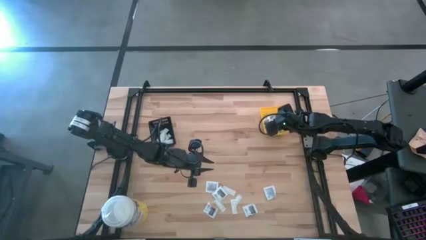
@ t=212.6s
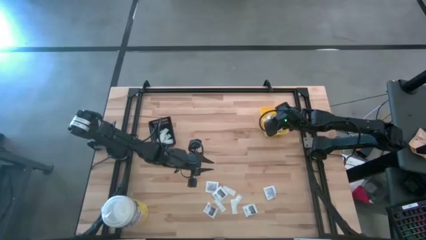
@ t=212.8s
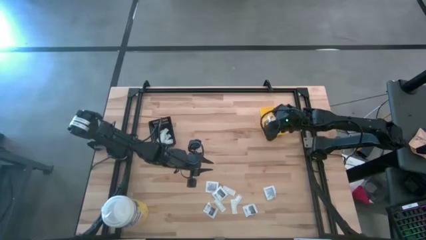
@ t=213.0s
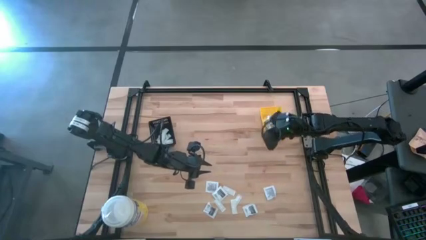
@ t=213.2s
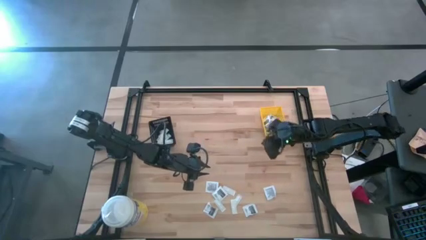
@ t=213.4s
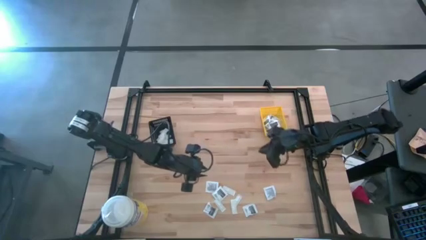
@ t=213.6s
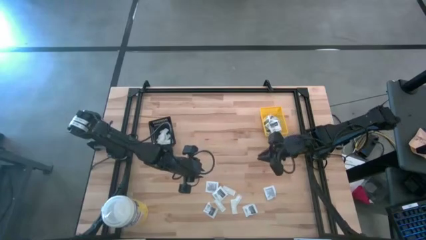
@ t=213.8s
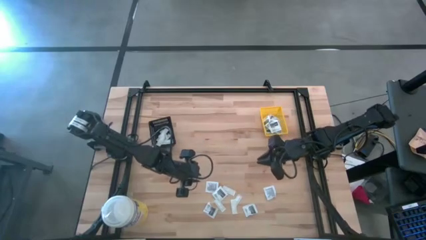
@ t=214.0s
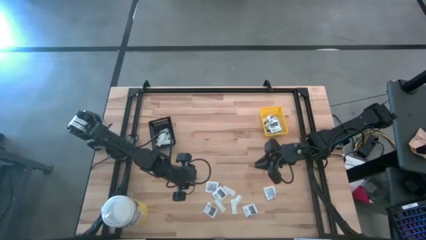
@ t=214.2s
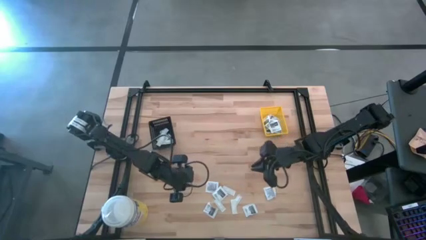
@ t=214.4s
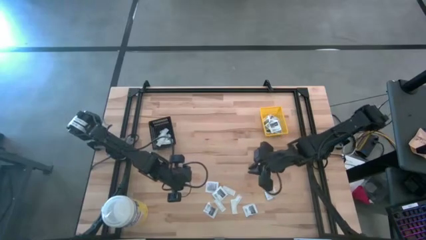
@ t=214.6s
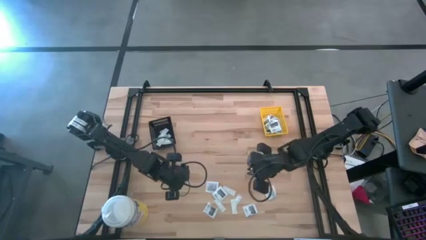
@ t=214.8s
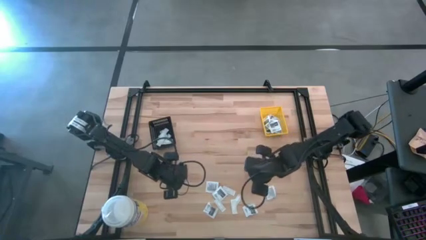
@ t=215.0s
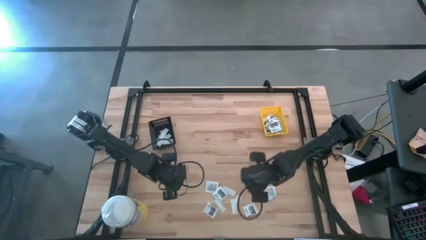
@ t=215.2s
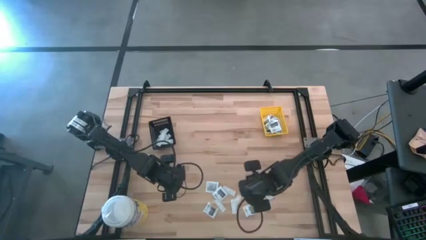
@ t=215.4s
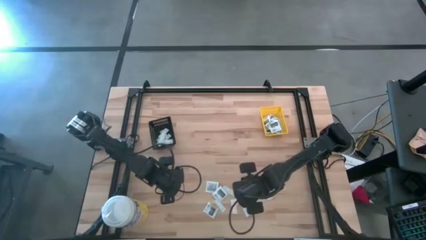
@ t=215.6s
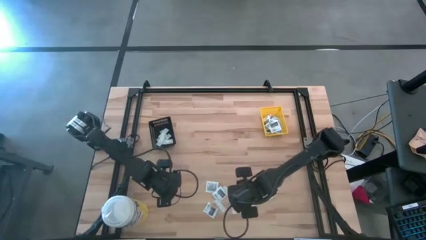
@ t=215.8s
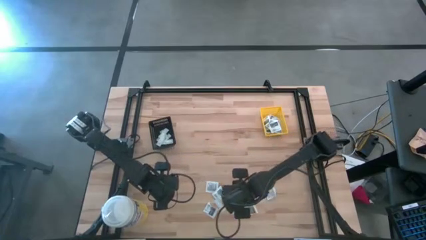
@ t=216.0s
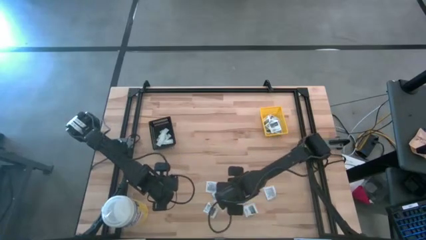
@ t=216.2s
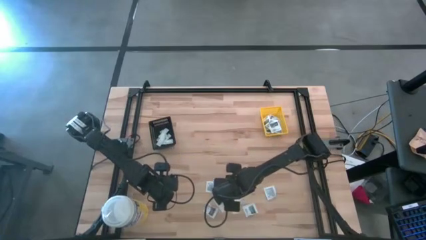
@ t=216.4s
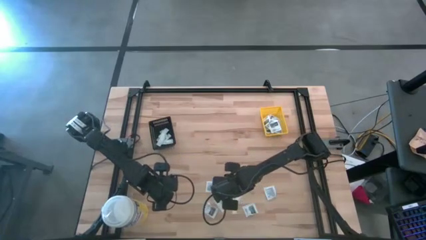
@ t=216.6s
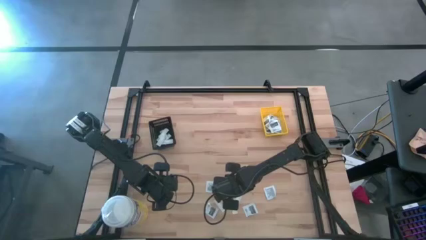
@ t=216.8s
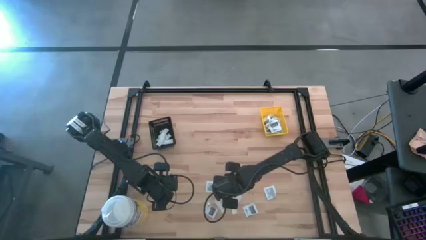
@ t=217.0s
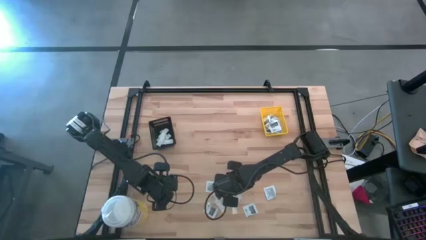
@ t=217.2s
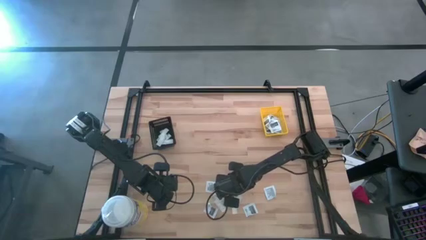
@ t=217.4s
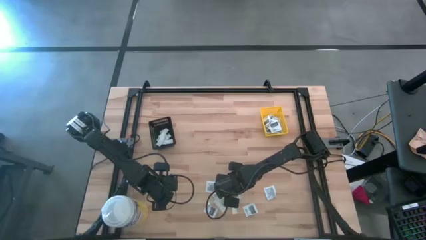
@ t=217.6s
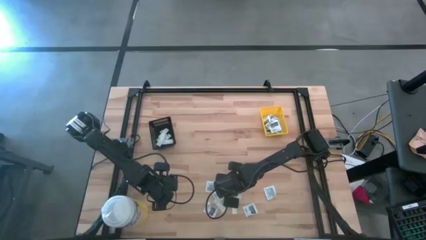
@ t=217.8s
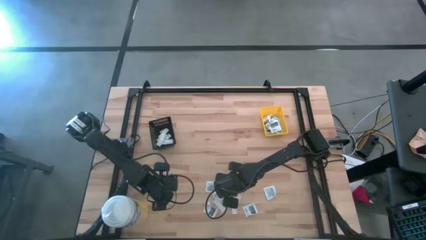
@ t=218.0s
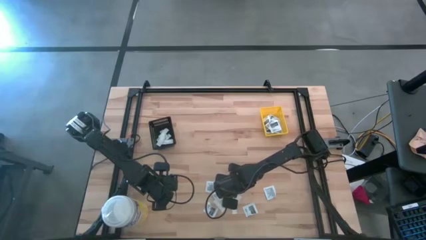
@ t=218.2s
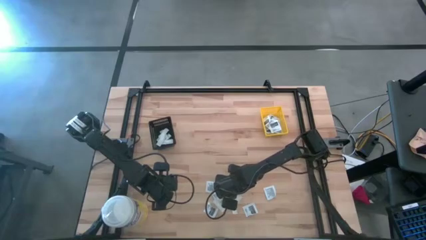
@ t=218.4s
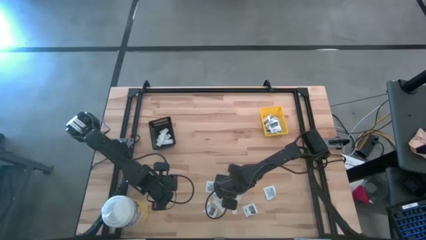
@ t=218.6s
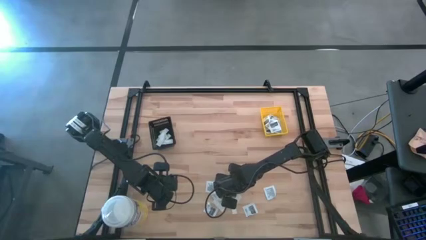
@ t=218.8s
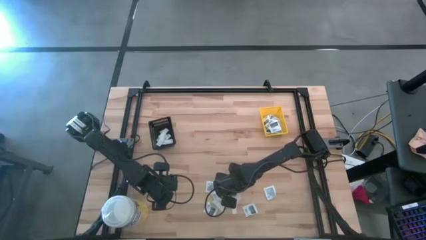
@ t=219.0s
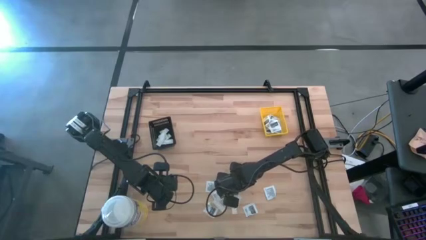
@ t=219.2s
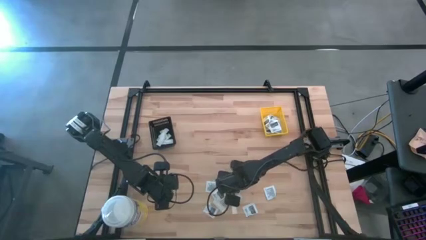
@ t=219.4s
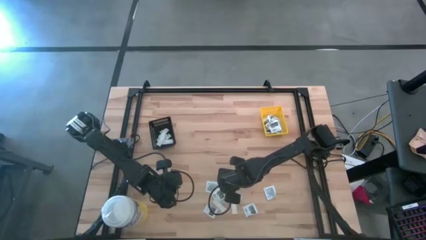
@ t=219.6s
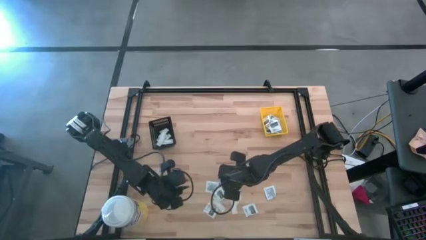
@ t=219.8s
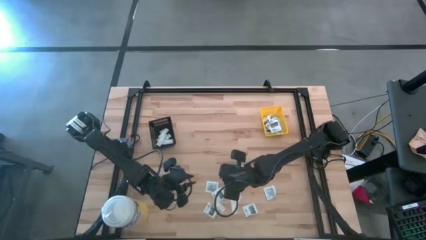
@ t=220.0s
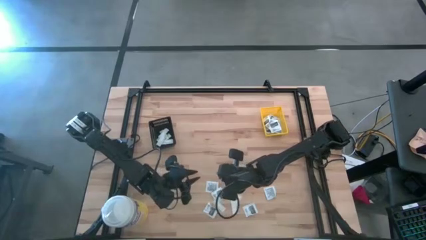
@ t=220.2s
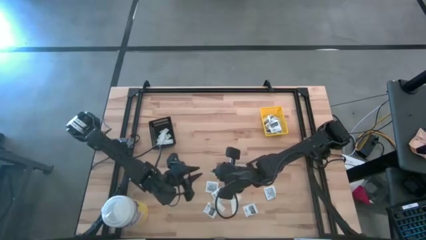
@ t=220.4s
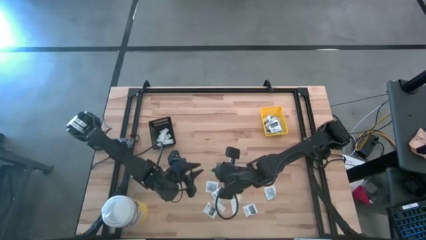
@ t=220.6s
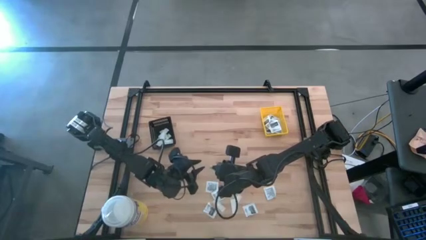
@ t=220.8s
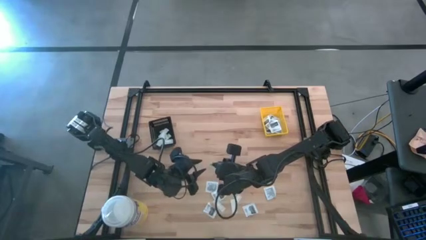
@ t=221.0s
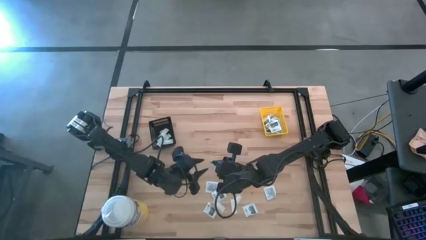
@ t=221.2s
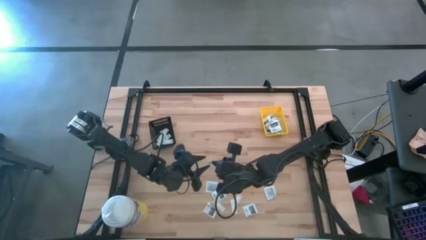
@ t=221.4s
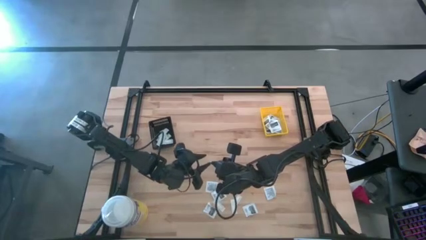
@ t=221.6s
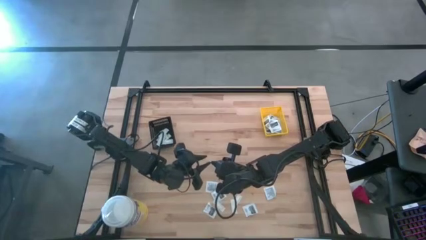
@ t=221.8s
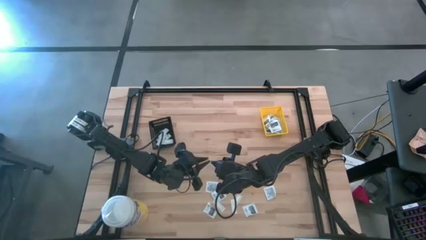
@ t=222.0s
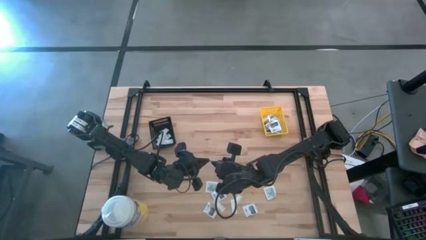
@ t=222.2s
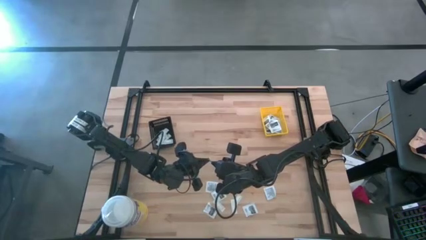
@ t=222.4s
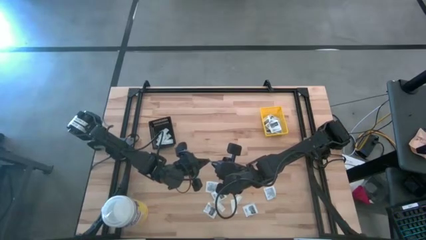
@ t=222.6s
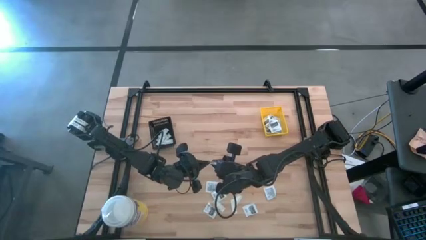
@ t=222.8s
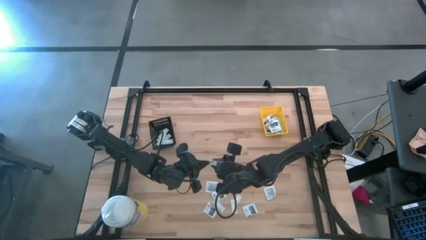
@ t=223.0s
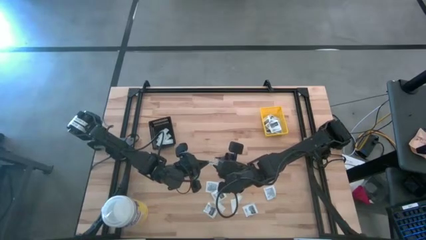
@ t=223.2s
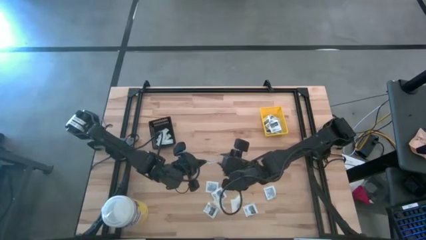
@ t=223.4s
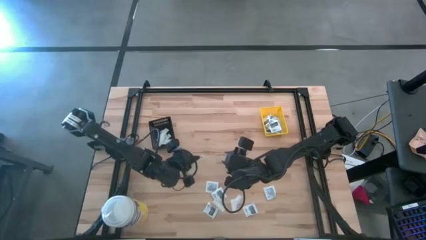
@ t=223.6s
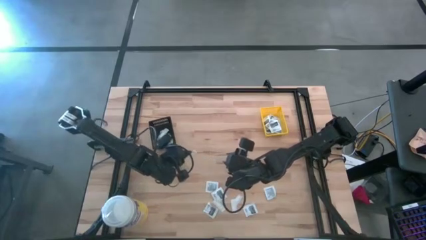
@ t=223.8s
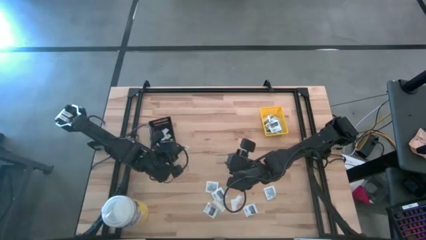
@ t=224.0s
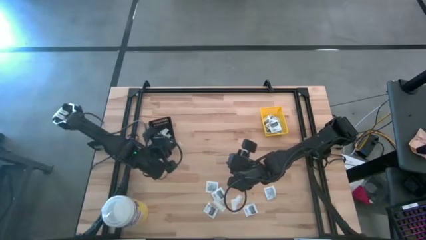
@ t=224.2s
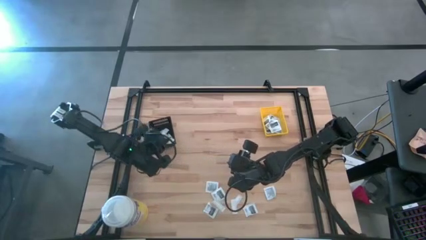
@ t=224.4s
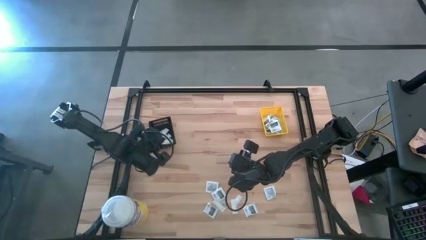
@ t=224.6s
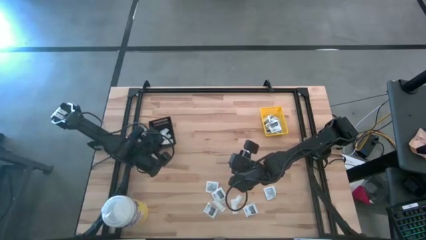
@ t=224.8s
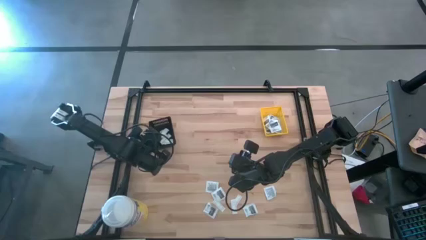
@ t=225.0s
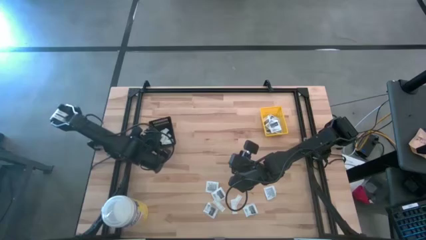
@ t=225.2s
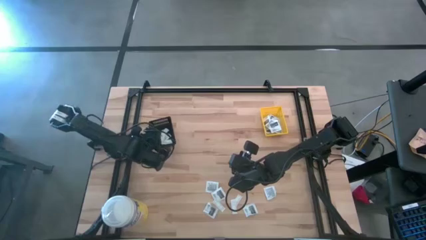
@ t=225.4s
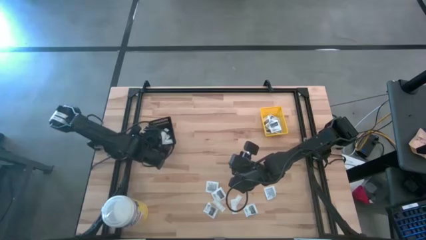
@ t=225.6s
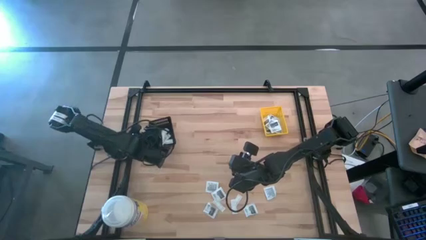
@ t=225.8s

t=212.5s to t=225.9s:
Task: Pick & Place First Aid Supplies
Put the green bandage into the black bin
